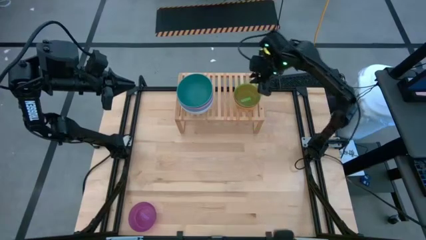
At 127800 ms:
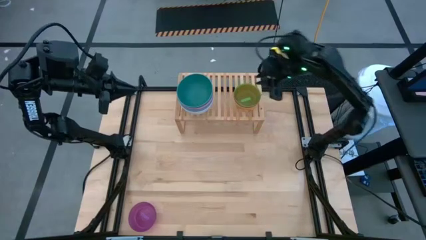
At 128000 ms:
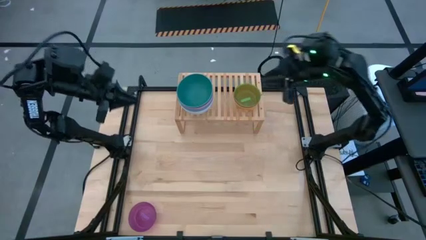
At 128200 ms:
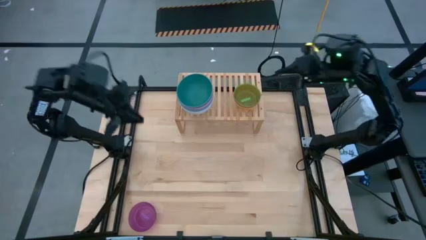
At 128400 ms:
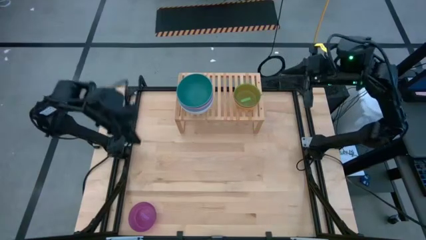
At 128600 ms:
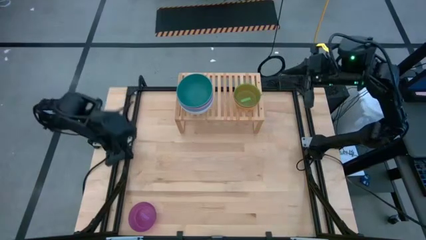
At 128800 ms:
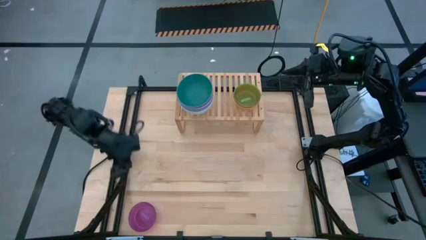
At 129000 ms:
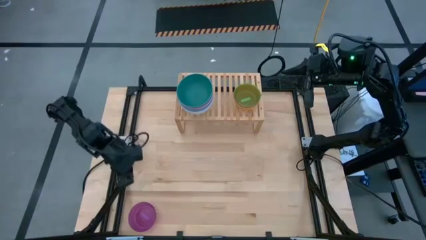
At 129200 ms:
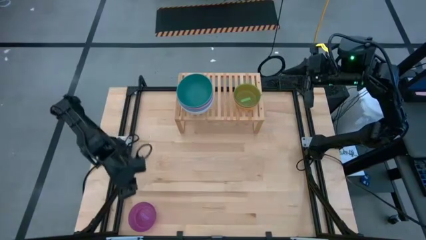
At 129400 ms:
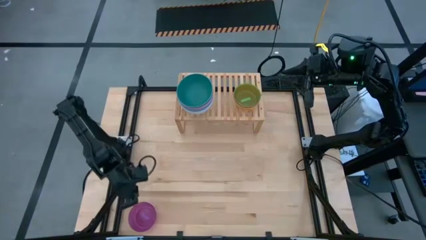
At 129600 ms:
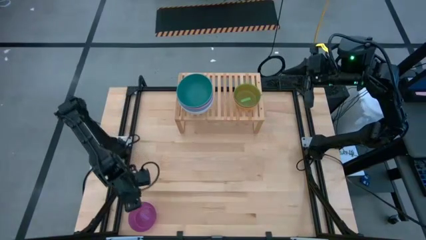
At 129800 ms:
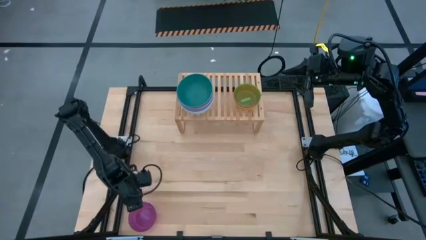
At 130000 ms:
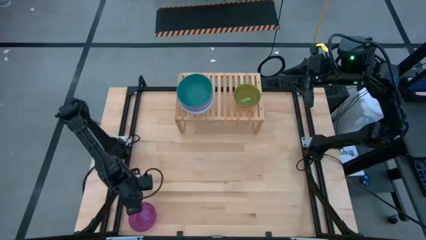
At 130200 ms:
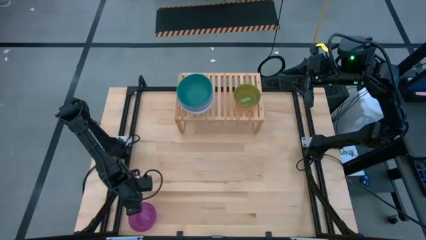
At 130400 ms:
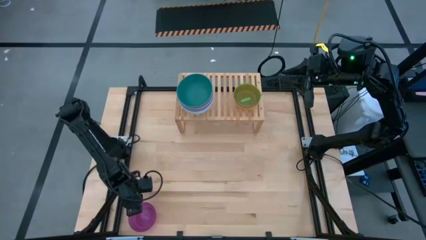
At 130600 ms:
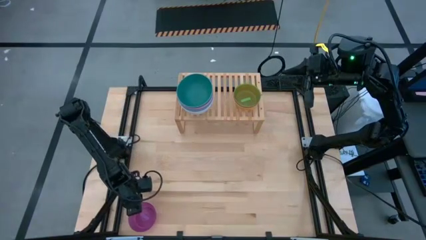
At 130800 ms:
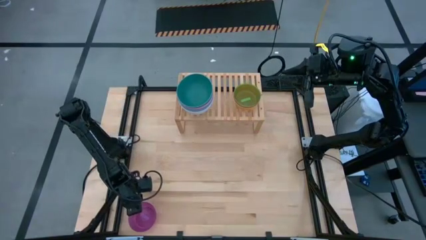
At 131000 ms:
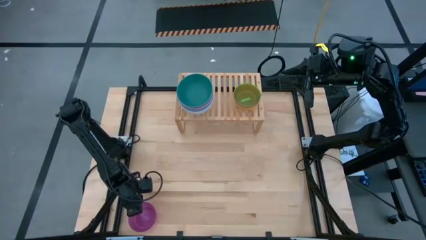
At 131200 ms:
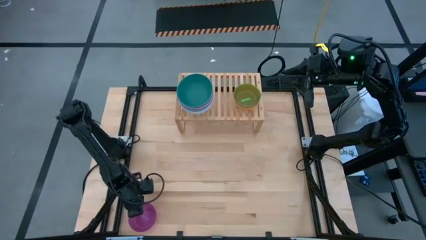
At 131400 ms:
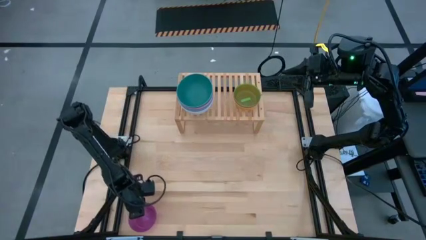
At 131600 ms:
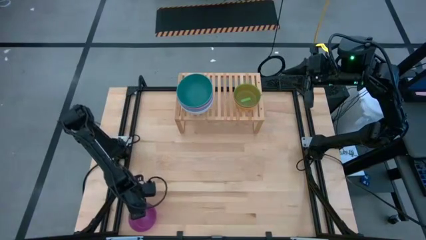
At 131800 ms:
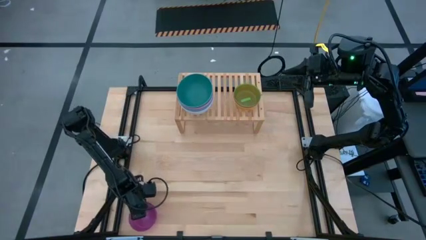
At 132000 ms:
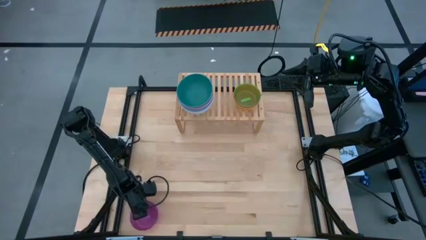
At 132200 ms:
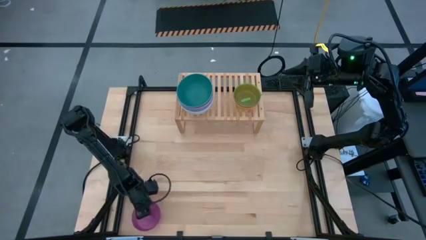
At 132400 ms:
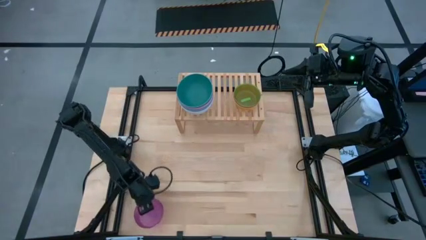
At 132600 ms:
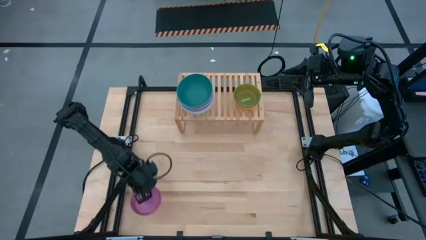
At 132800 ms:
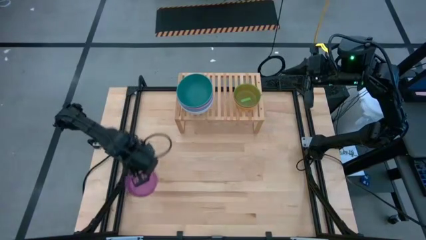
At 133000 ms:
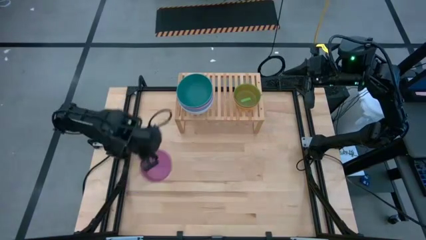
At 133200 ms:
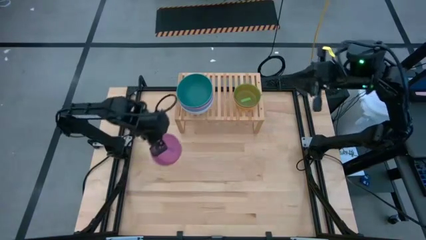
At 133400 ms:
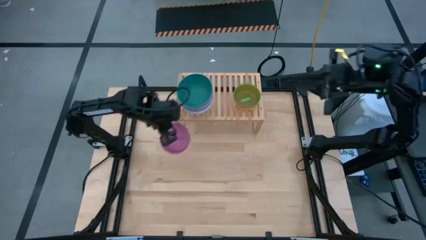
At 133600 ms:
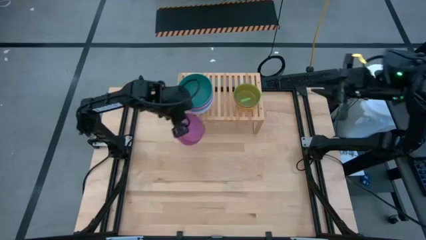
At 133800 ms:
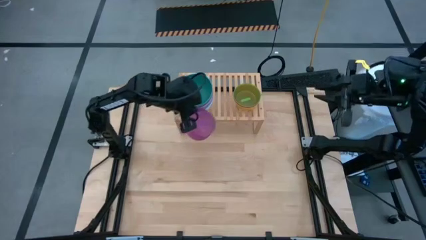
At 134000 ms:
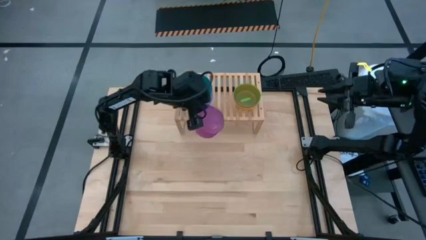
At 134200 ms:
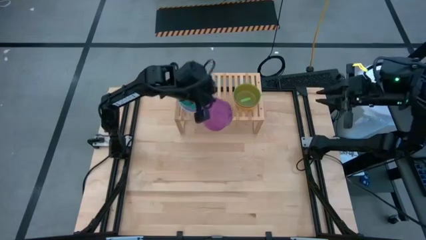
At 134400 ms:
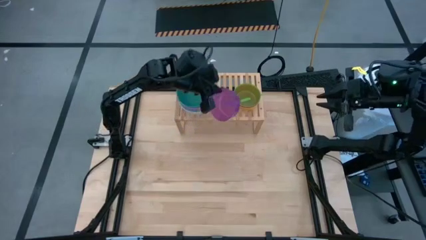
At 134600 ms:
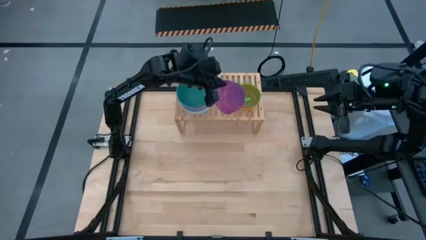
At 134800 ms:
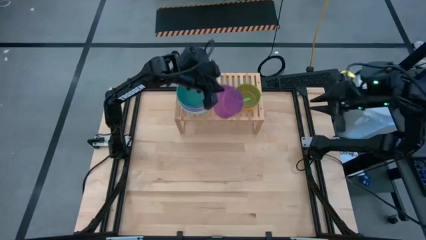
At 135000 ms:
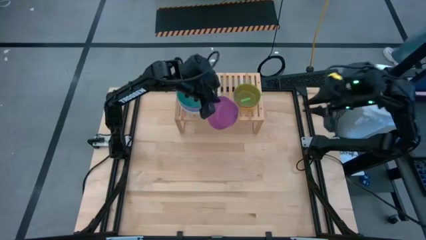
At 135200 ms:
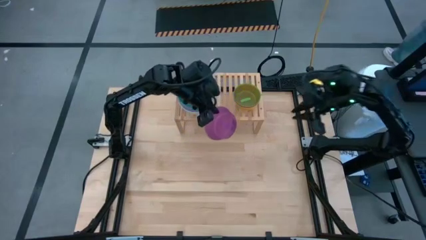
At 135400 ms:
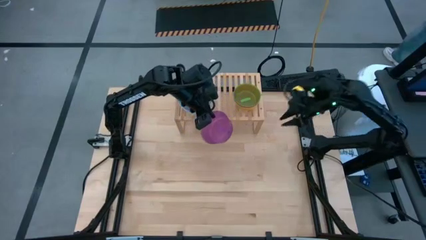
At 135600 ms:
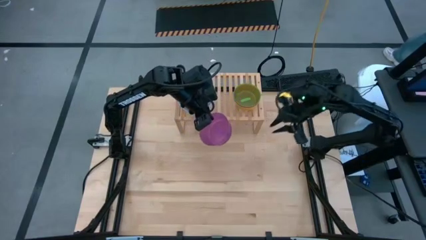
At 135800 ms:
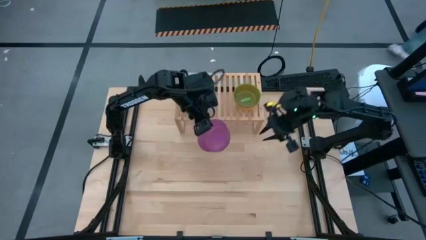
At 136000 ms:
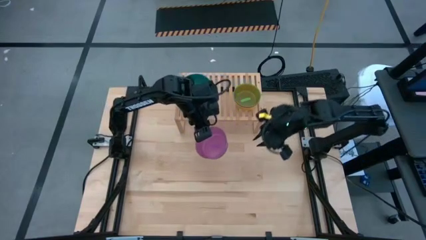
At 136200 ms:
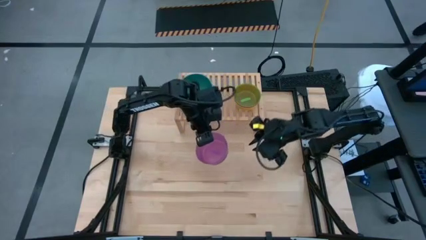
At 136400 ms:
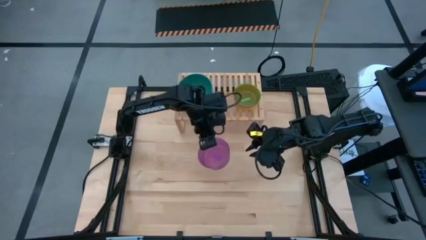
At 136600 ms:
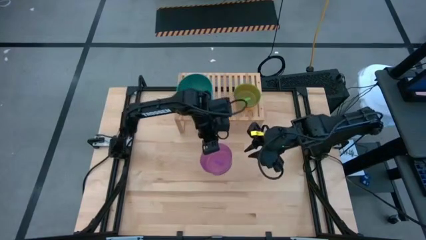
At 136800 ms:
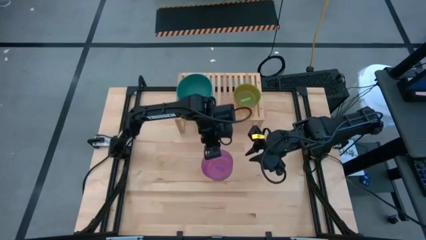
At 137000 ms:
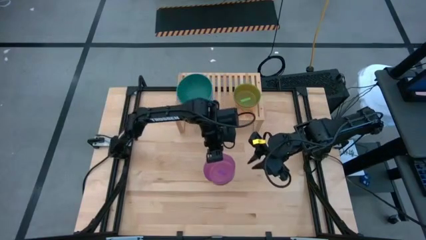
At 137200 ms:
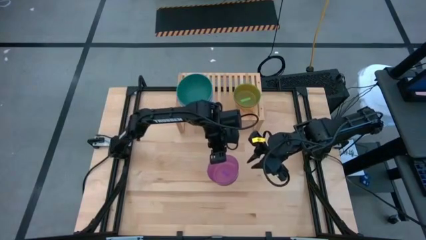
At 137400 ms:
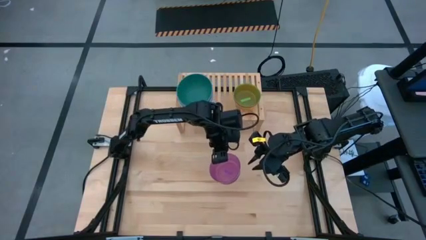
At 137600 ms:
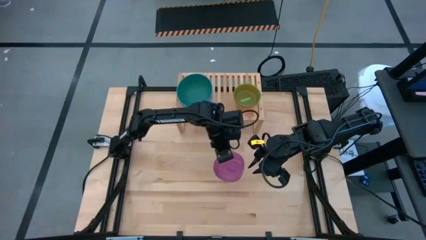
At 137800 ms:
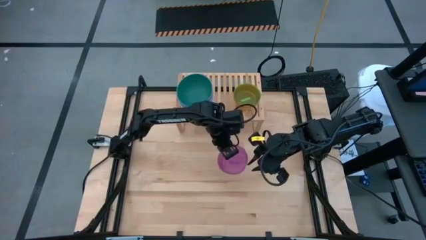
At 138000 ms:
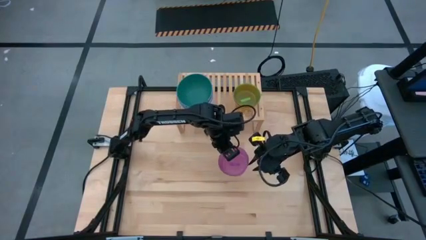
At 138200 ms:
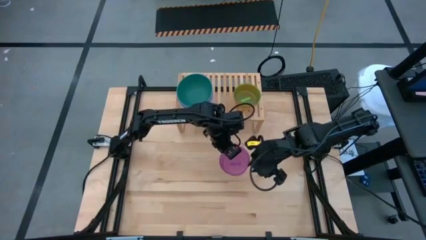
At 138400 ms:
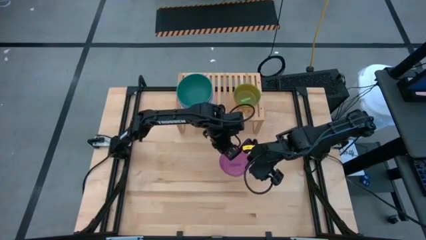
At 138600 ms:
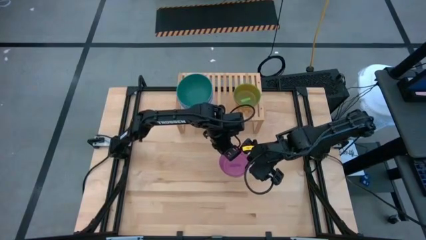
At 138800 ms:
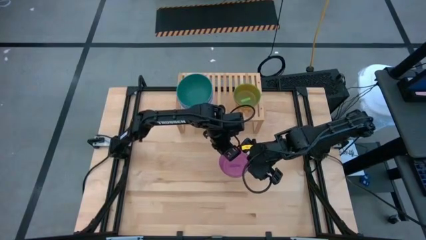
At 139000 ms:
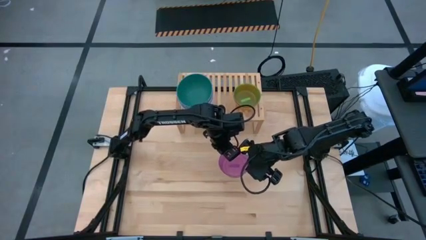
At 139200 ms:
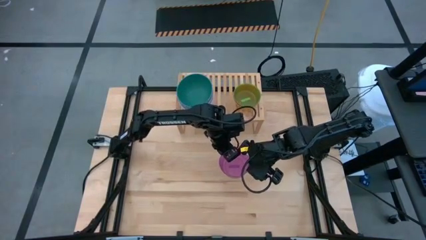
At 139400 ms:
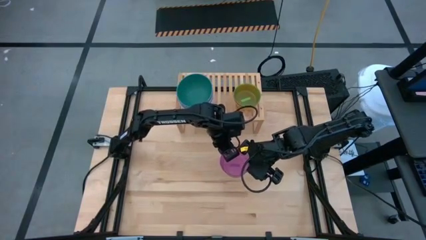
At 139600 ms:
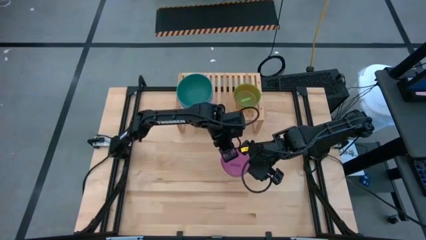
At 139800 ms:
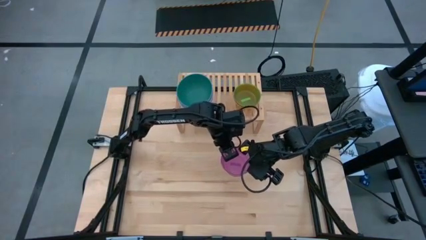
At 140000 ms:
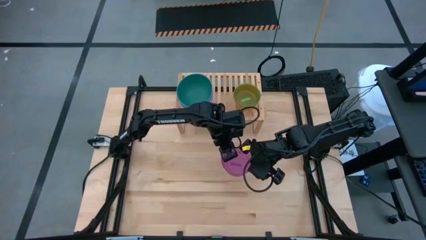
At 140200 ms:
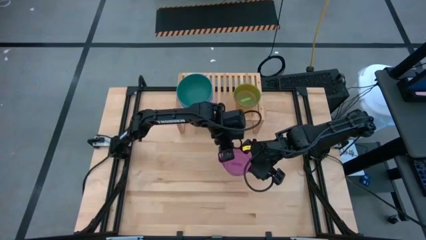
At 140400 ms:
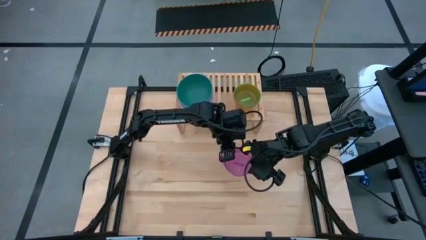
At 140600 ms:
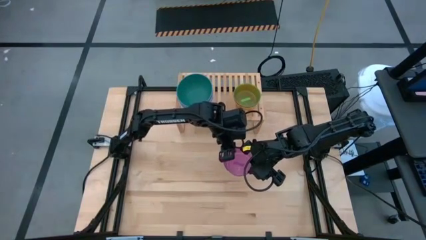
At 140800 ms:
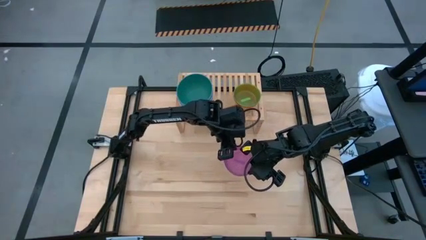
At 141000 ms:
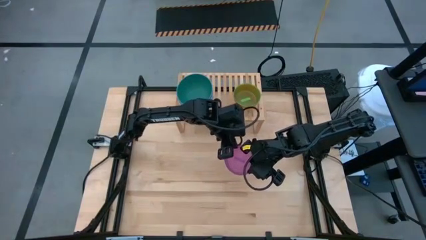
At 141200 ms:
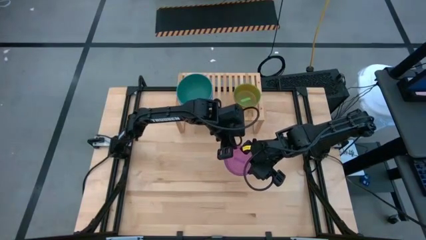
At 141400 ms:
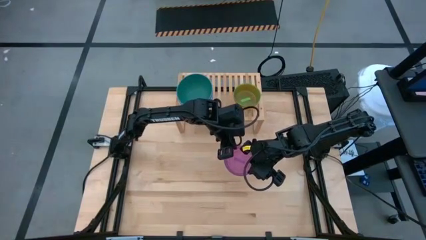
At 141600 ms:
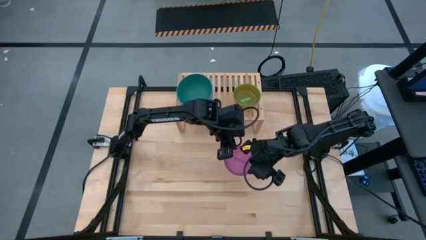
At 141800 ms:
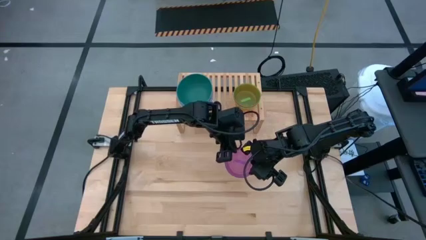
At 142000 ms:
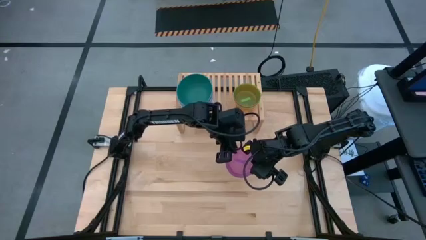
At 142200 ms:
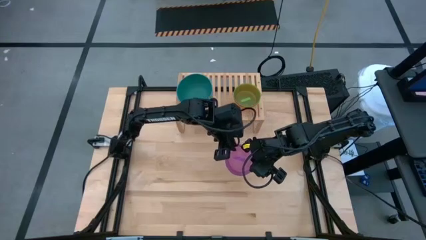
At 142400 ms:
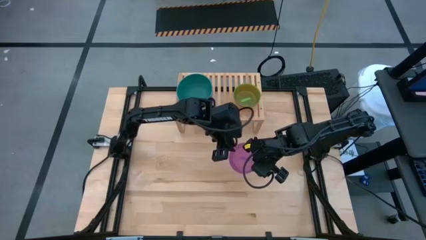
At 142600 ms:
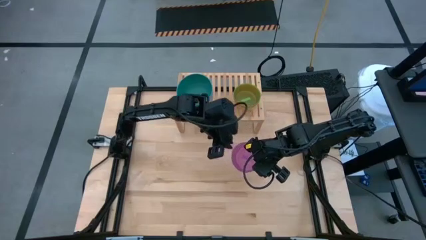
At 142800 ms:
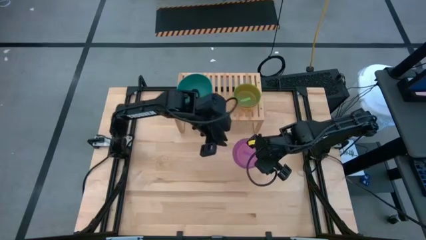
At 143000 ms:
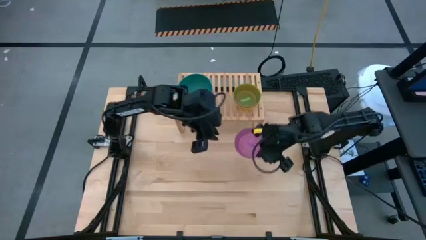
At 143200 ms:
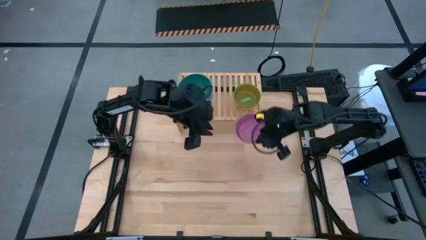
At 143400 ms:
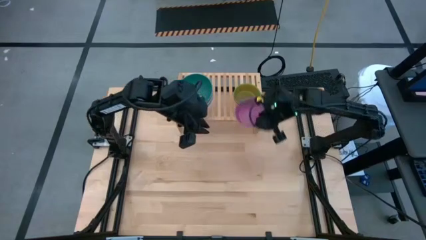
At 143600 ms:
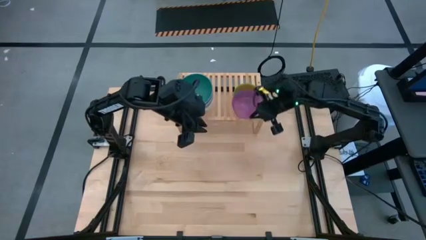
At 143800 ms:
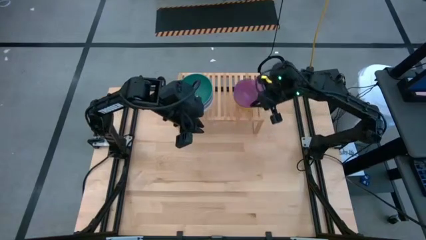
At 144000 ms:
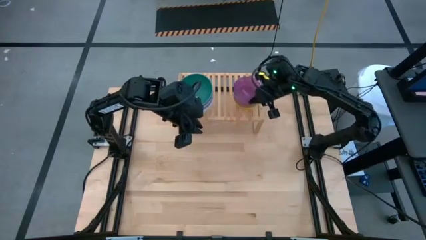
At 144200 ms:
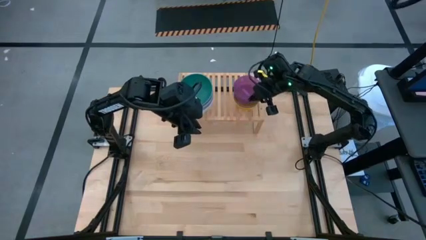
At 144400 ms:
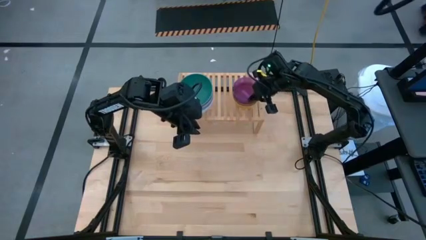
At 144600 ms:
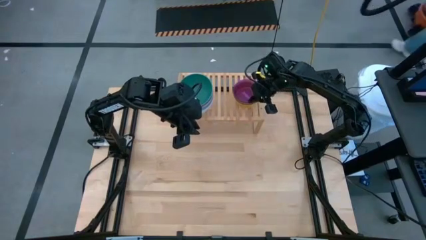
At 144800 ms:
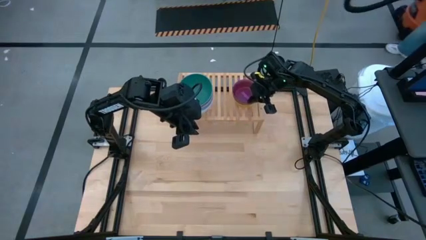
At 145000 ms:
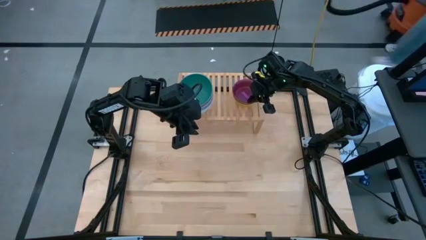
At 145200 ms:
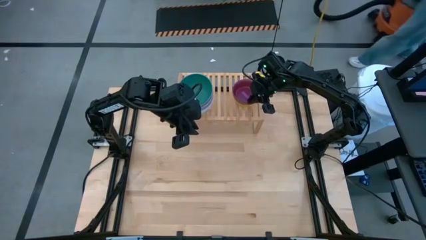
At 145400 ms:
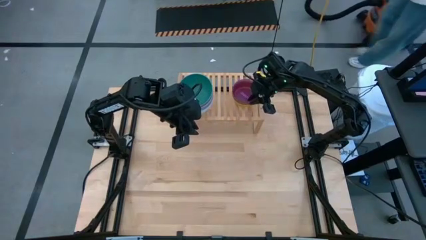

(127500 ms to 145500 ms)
Task: Place and stack bowls onto a shelf
Stack the purple bowl on top of the light green bowl on the shelf
